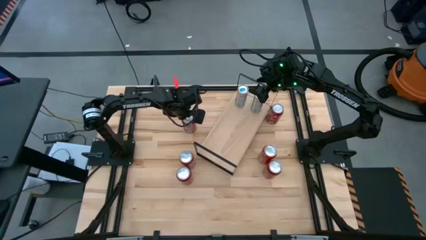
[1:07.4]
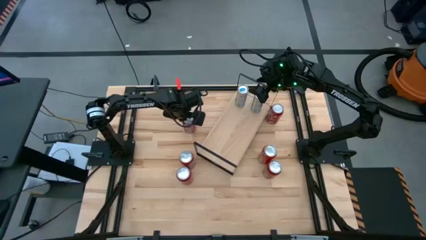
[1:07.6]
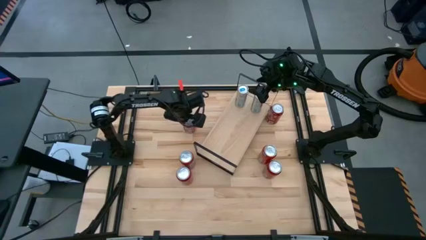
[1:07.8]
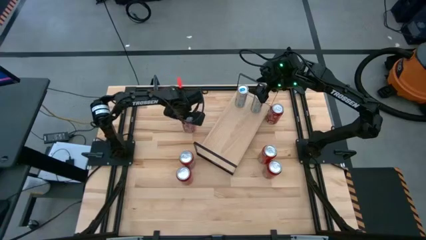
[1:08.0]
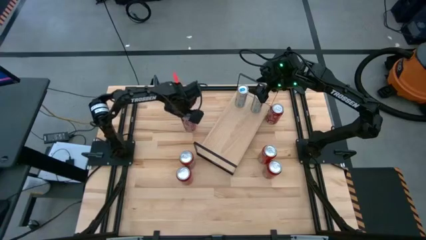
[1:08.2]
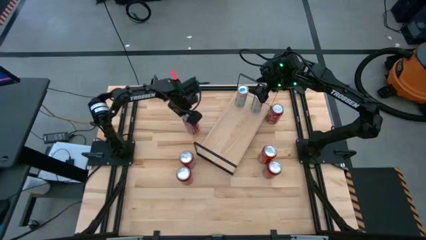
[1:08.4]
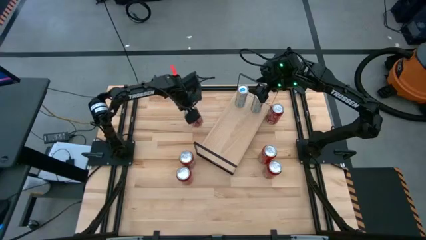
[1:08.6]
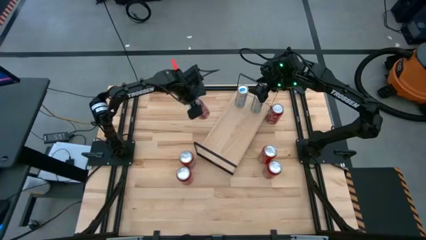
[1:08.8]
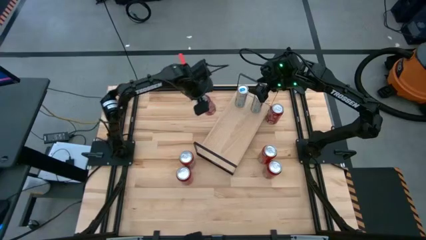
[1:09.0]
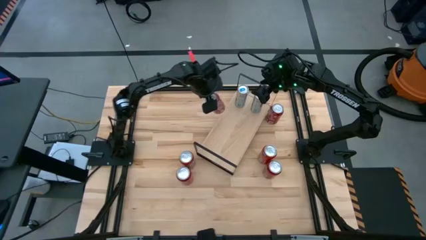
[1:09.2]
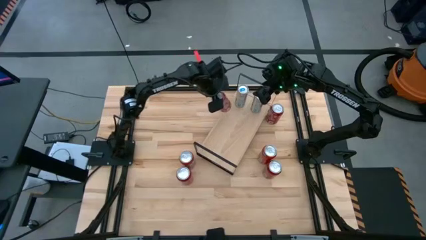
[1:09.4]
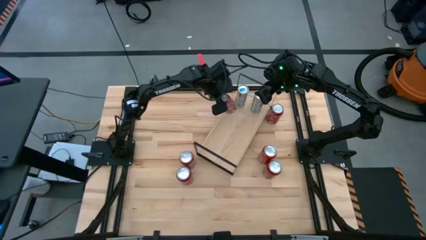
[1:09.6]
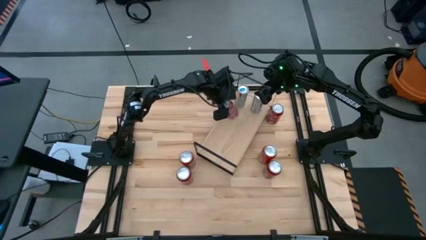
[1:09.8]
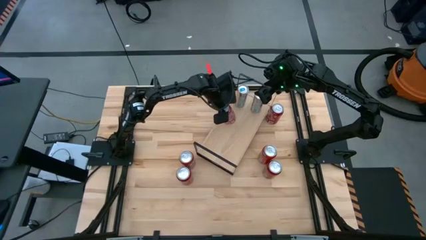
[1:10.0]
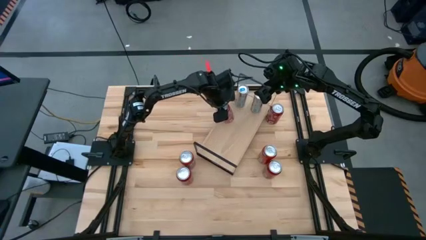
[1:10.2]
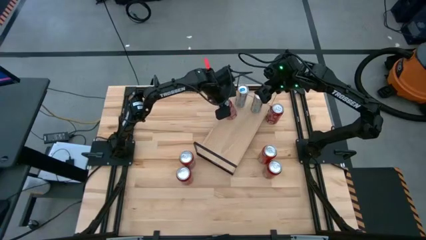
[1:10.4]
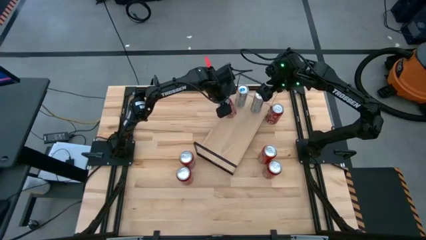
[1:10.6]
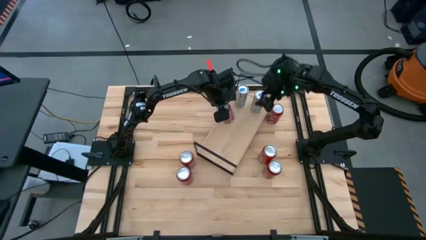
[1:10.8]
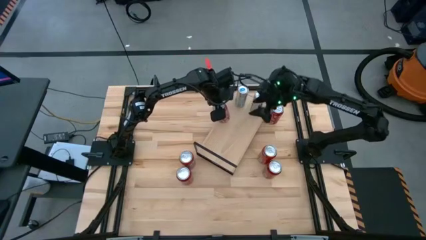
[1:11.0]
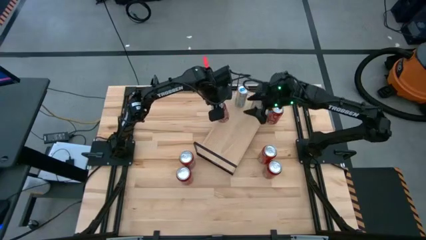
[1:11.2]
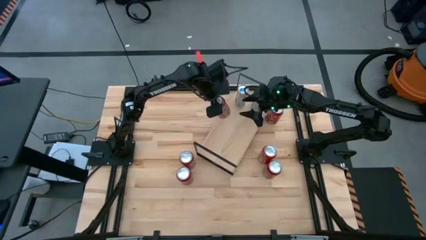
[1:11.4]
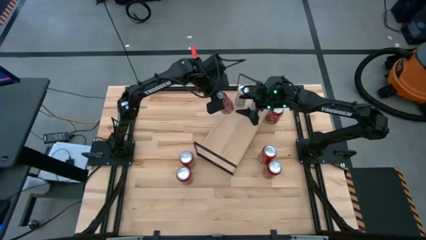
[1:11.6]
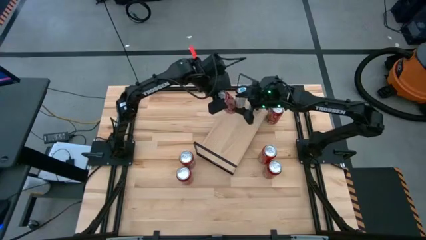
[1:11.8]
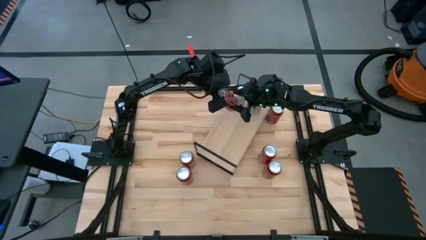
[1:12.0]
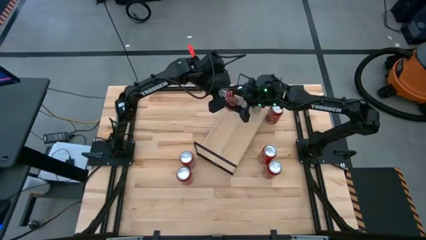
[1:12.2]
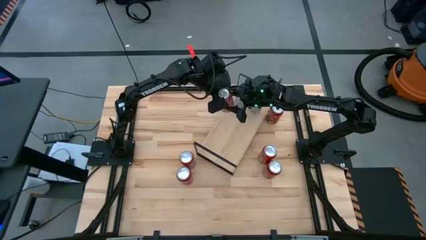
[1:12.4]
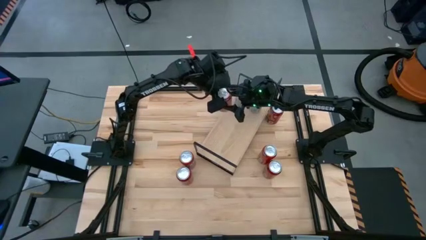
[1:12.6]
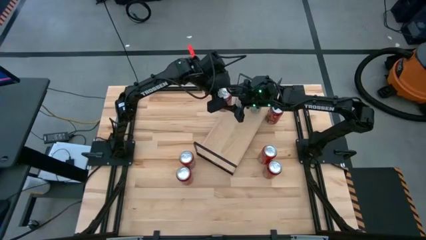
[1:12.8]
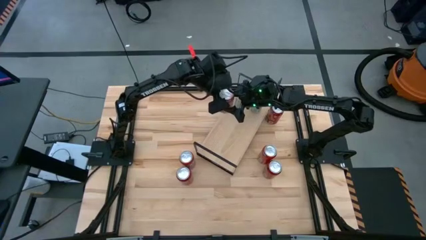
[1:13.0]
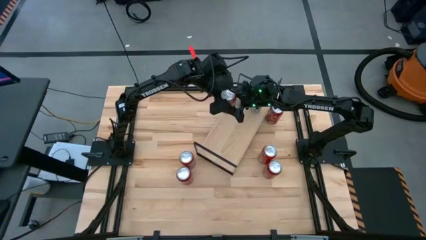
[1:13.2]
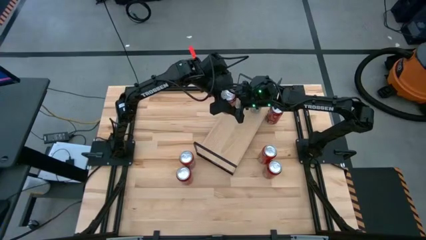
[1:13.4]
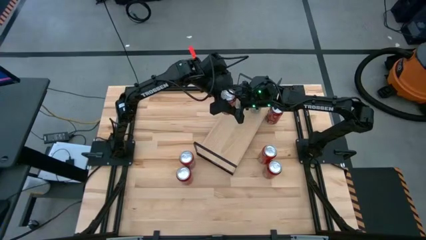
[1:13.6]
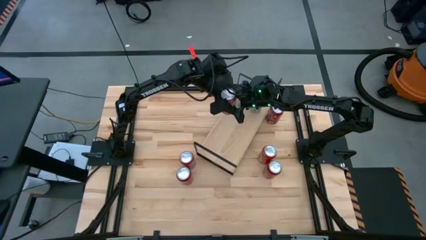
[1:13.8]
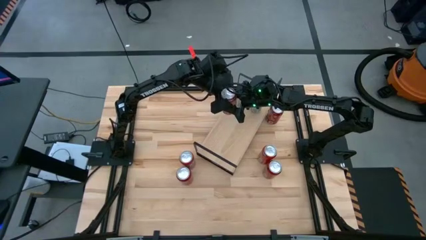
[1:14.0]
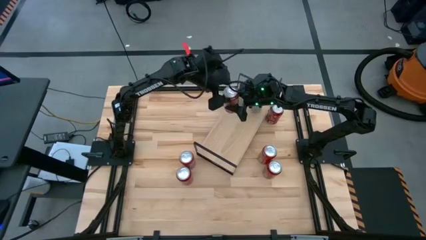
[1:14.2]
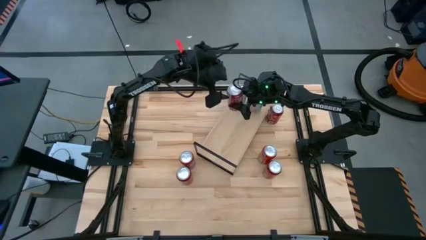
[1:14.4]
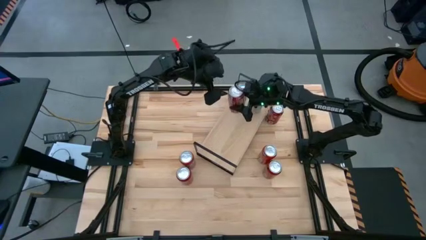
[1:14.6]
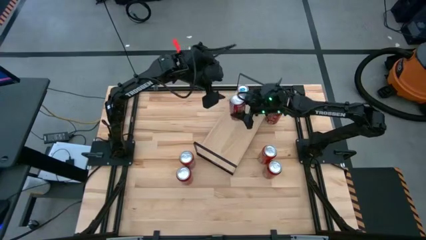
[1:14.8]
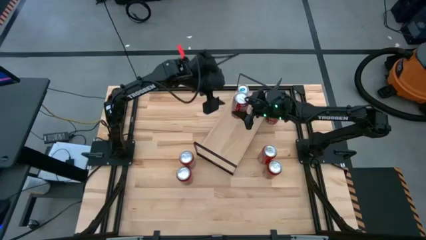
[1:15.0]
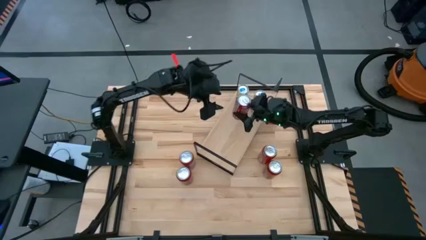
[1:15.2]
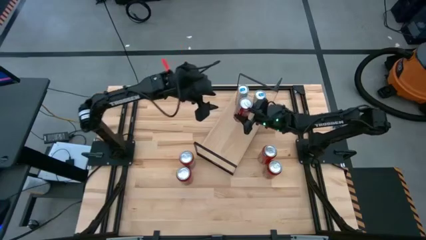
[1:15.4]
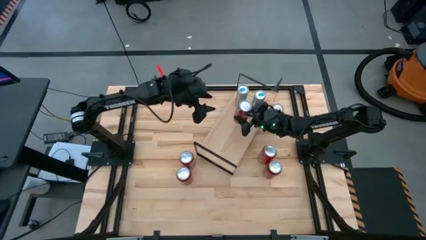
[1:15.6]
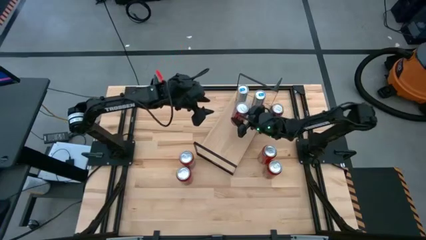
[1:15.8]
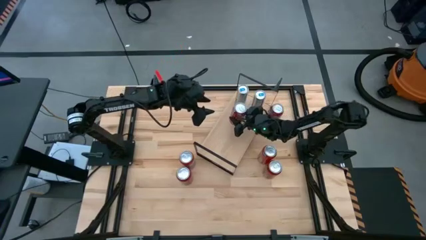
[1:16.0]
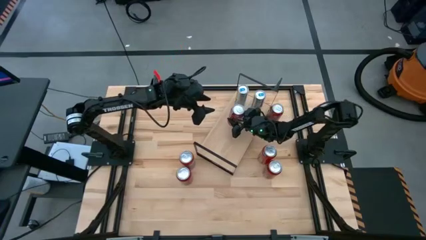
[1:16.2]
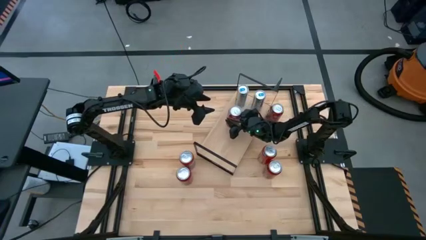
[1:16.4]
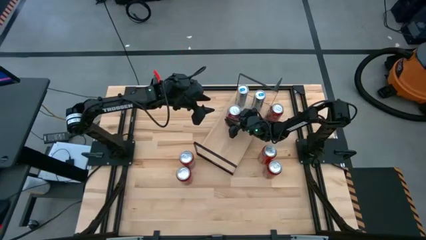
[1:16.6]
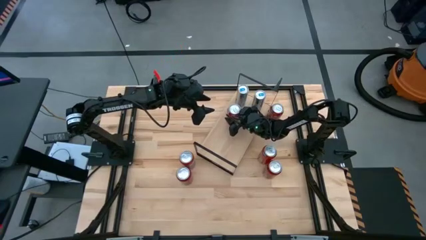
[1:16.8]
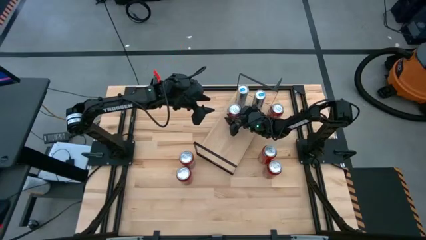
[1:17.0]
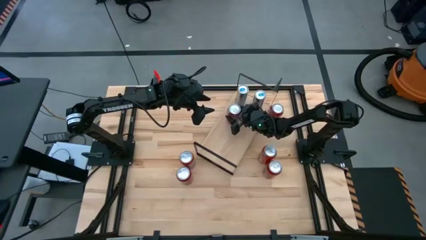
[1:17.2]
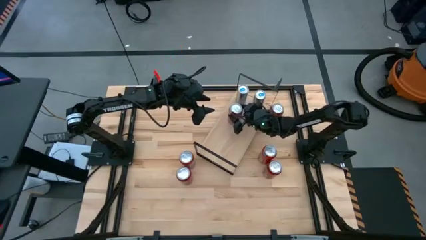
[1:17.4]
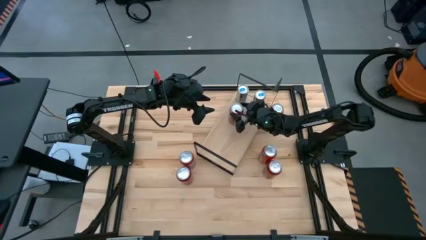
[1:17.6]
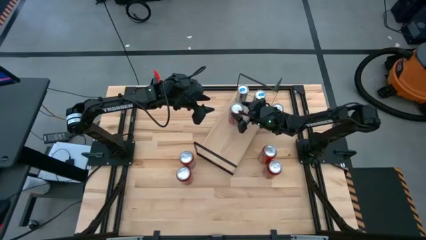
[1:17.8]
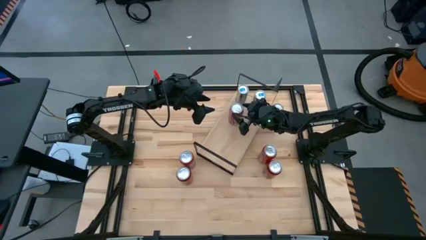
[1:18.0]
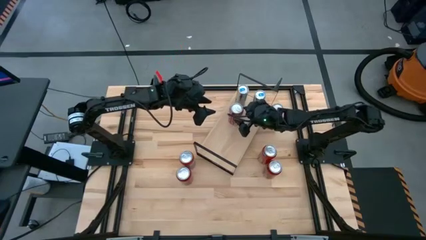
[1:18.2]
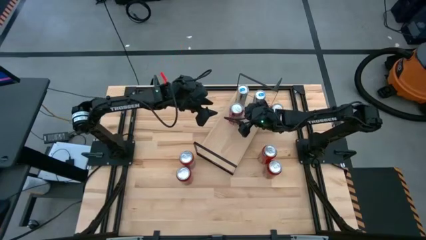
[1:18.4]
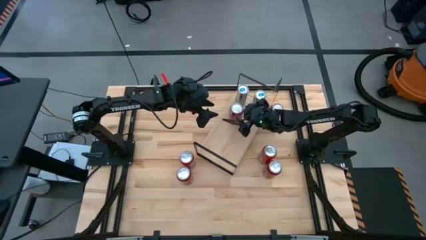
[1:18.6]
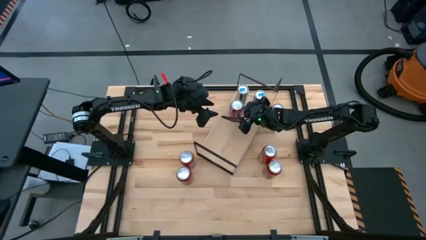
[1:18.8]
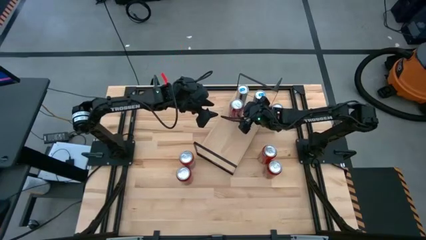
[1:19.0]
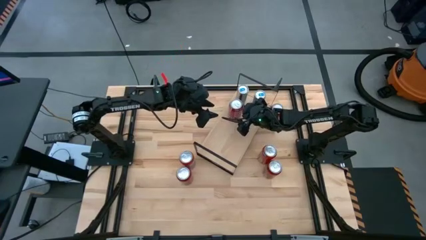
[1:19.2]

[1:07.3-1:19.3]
Task: Place canned beverage on shelf
Put the left red-white soda can on the shelf

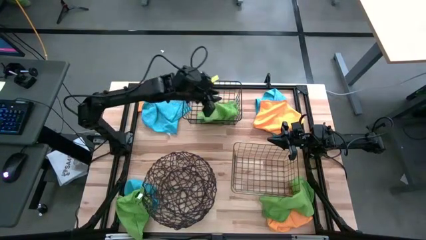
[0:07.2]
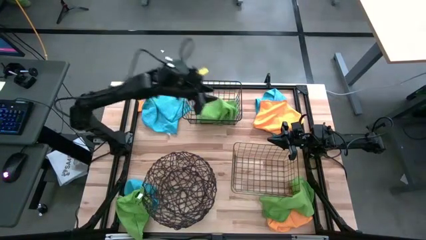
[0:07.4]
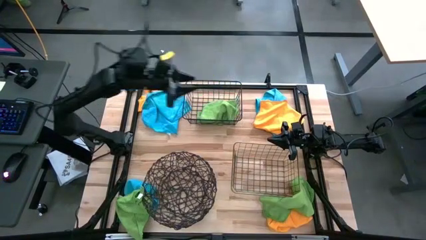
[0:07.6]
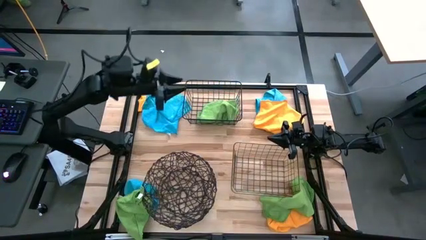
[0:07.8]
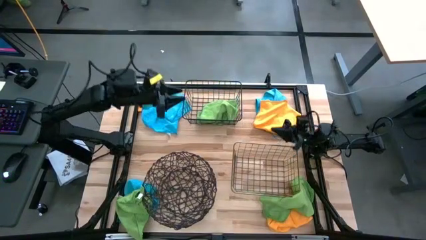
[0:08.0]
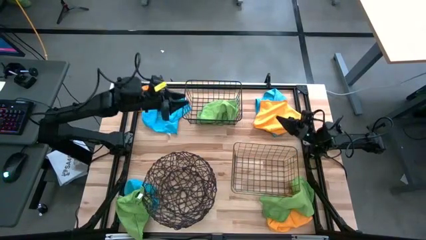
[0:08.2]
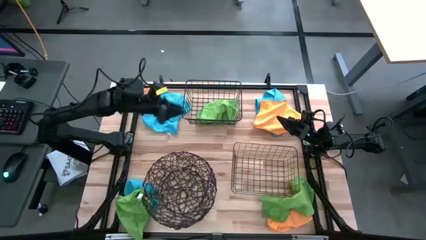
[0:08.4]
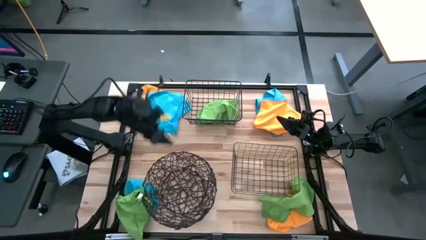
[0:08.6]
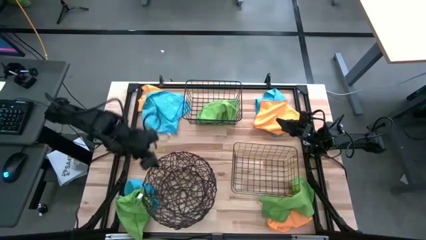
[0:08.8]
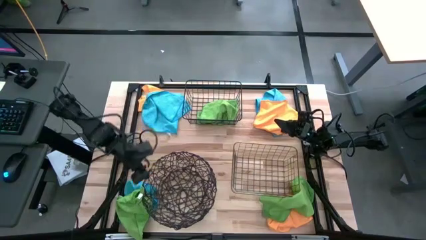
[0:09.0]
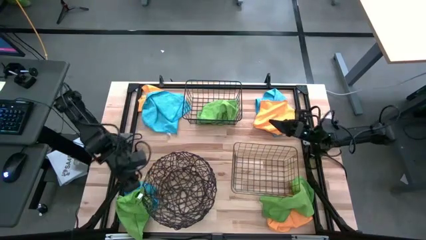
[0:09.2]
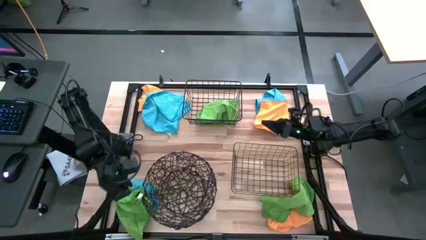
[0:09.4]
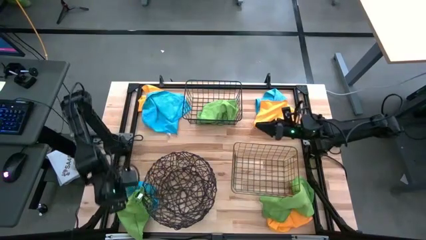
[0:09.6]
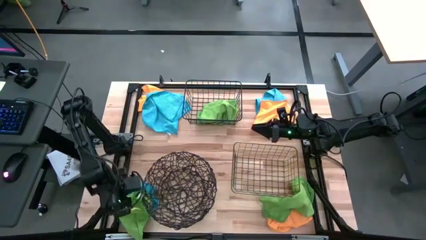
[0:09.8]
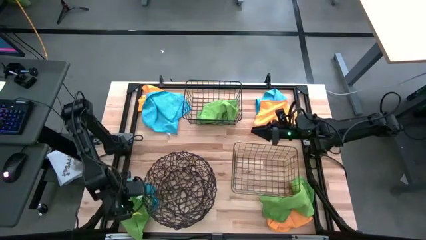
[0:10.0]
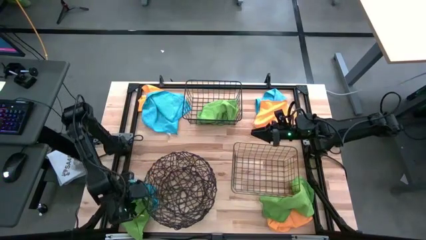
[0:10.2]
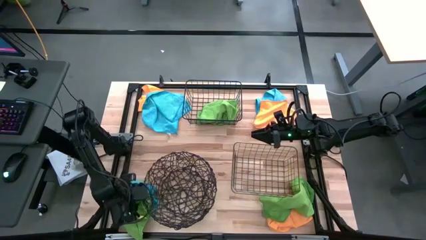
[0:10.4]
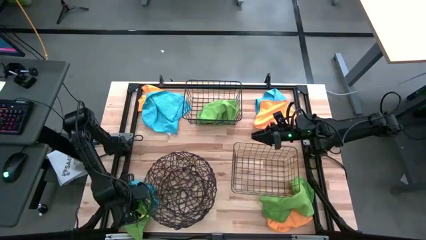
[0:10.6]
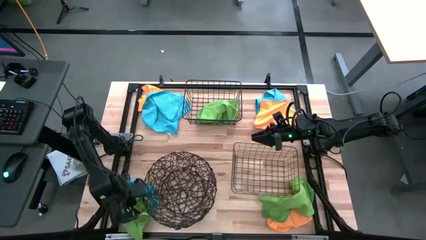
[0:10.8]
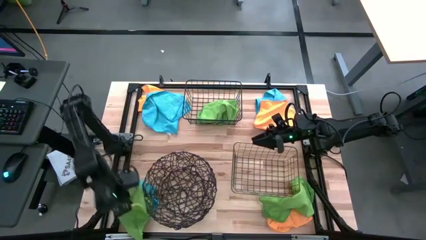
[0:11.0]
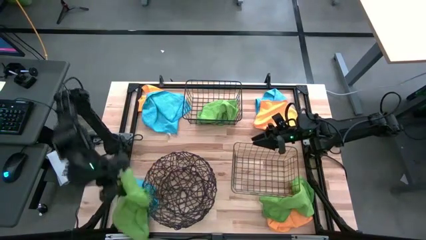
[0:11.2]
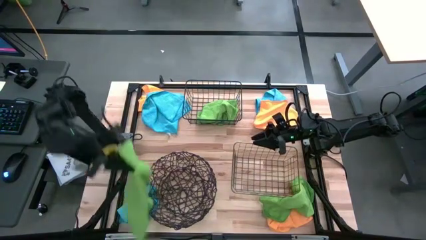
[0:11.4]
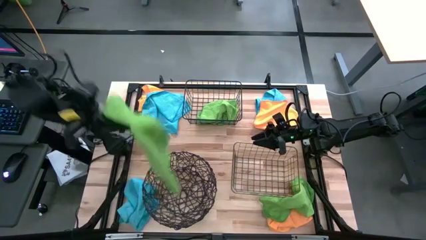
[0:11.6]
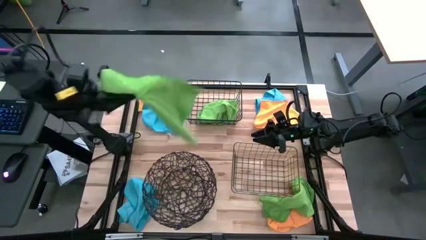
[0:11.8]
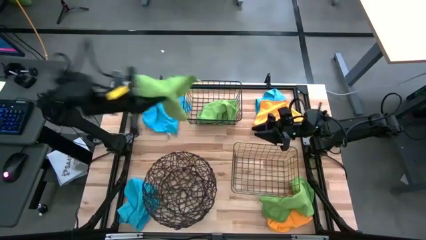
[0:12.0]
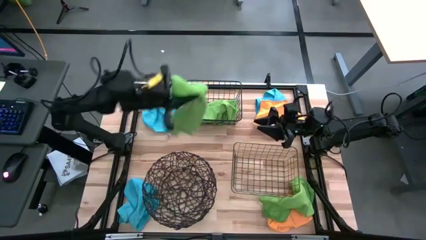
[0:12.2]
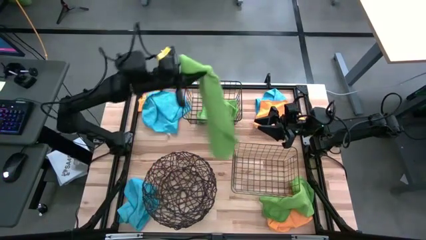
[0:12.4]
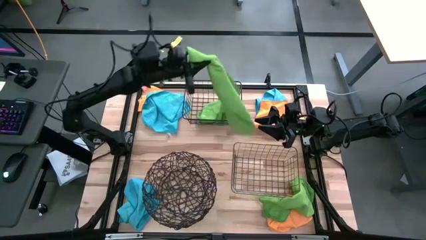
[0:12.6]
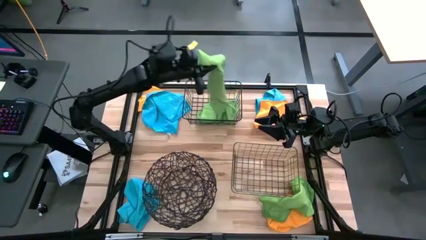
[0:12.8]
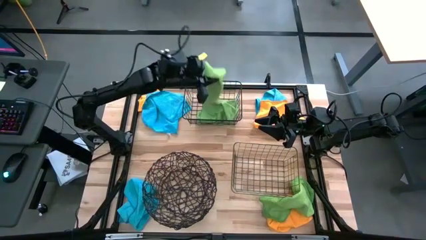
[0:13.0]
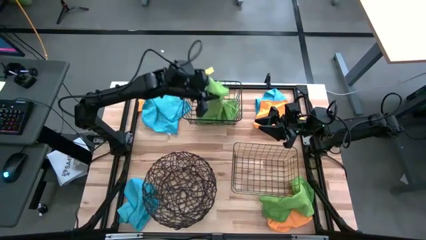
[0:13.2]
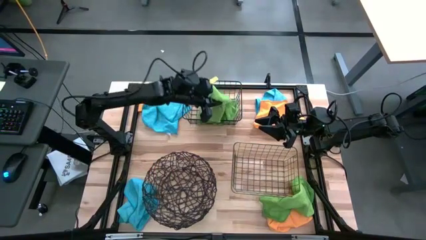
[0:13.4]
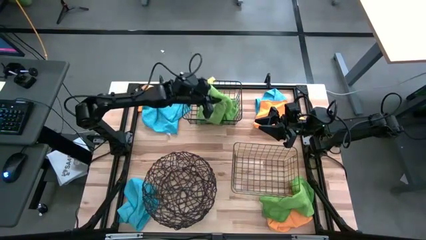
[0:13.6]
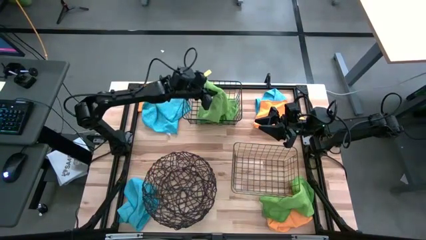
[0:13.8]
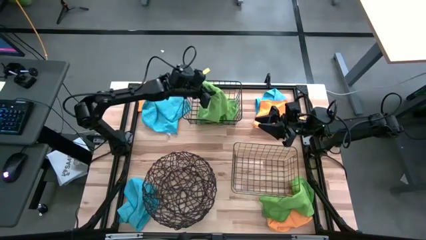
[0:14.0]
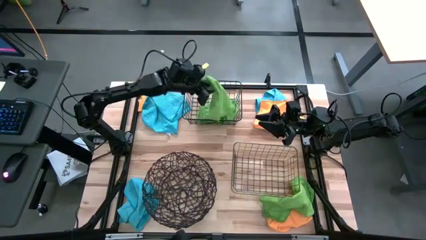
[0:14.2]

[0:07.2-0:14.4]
Task: Sort microfiber towel by color & place in baskets
Put the left green towel into the top black wire basket
